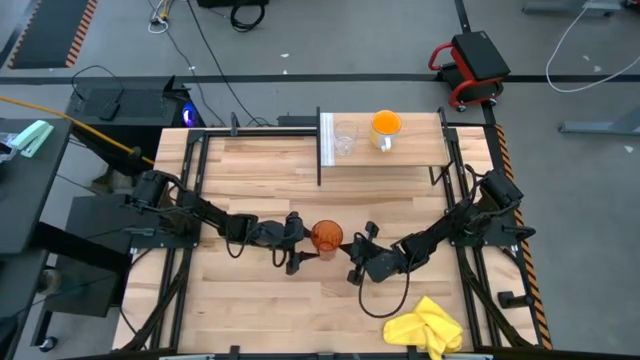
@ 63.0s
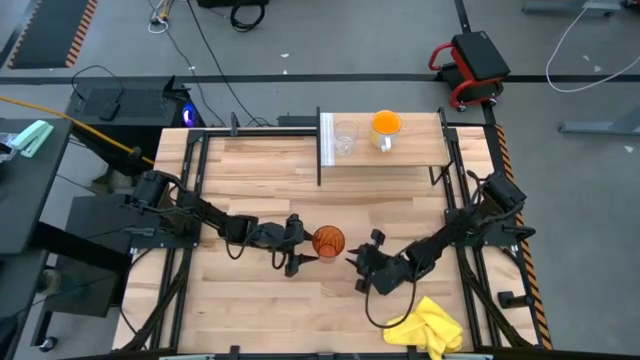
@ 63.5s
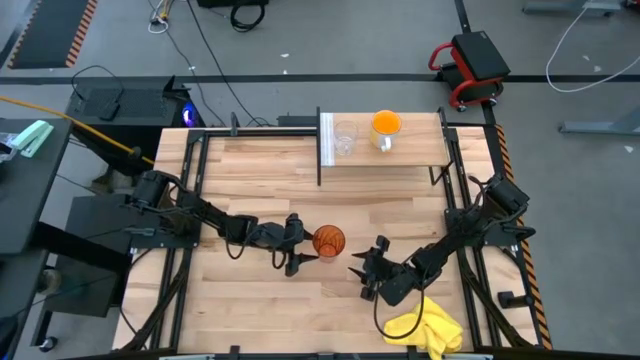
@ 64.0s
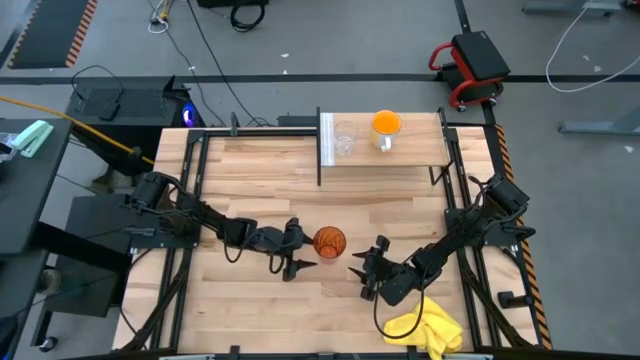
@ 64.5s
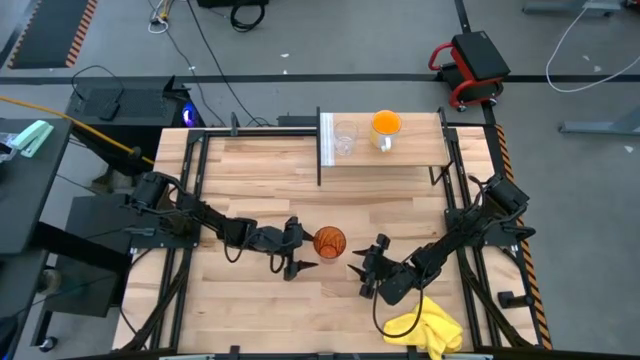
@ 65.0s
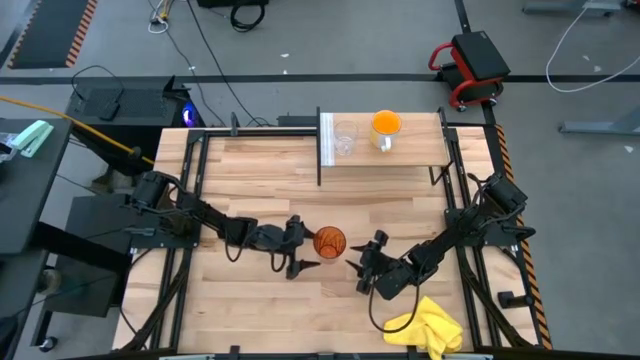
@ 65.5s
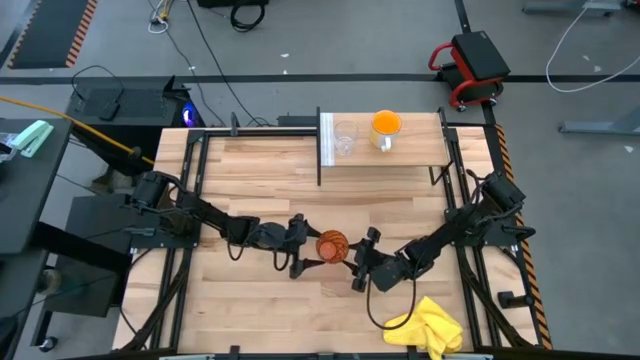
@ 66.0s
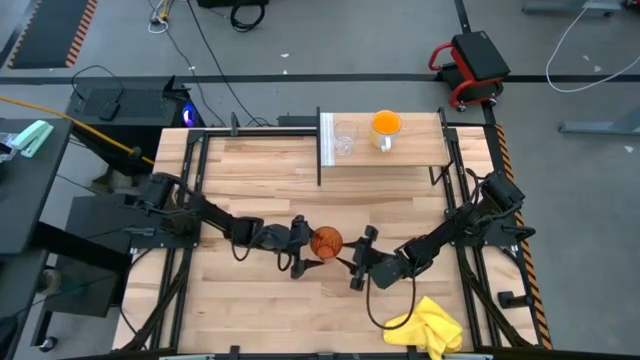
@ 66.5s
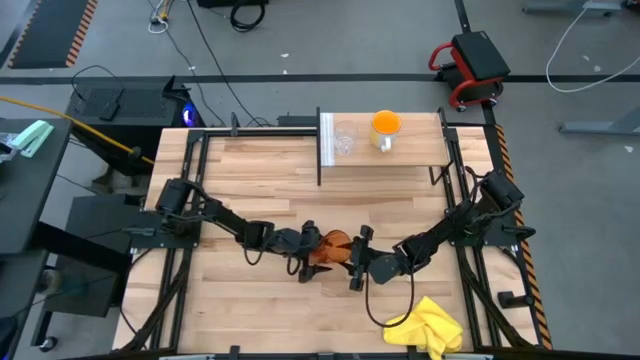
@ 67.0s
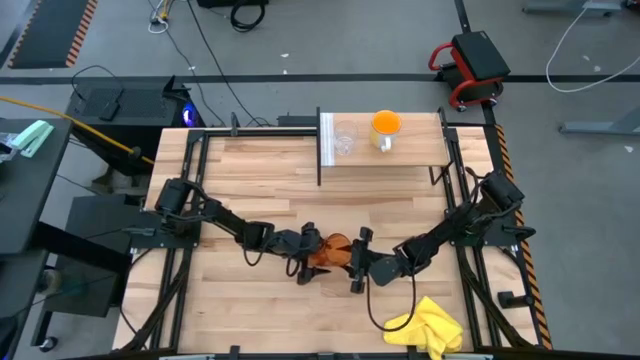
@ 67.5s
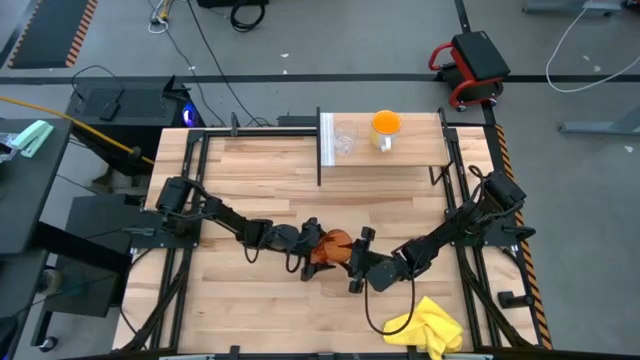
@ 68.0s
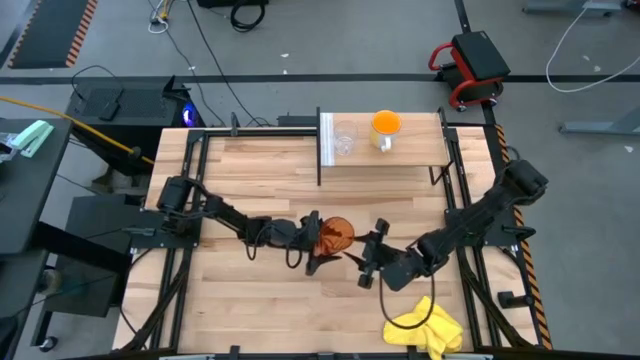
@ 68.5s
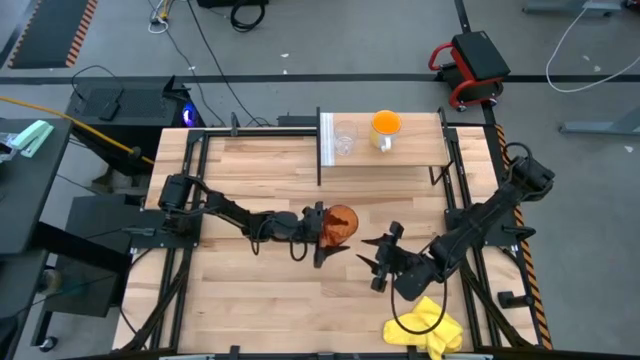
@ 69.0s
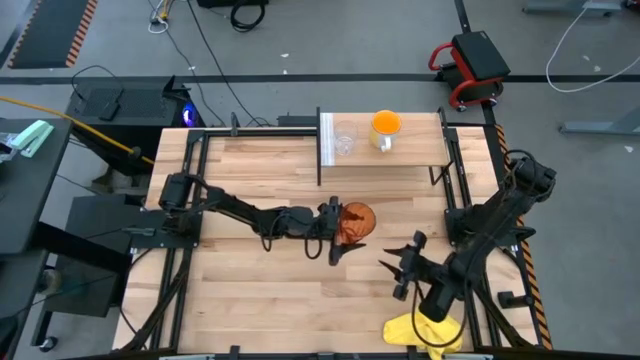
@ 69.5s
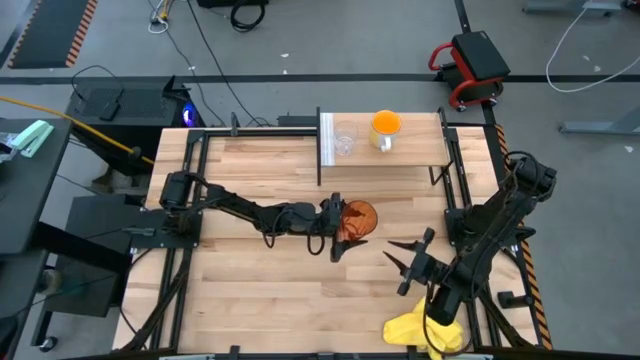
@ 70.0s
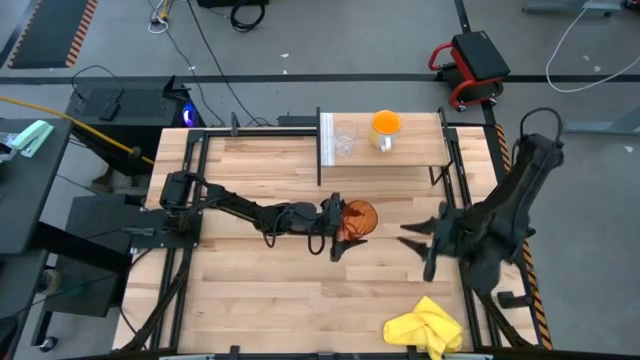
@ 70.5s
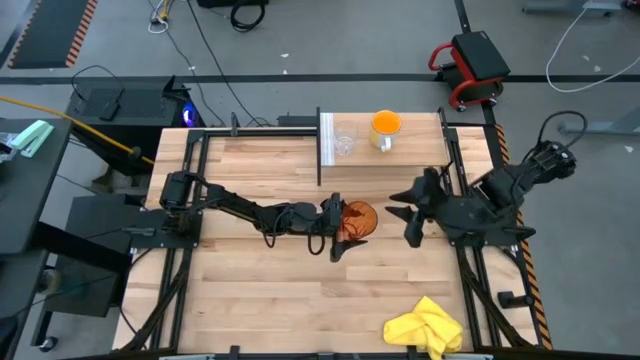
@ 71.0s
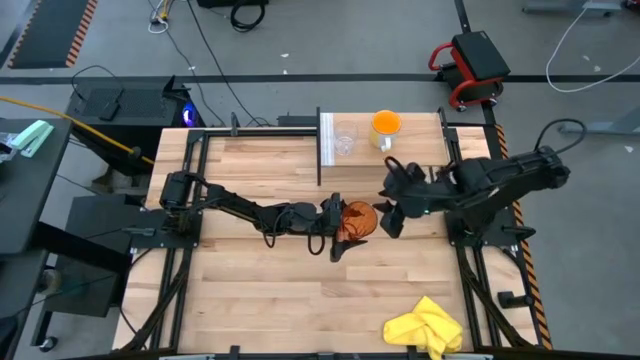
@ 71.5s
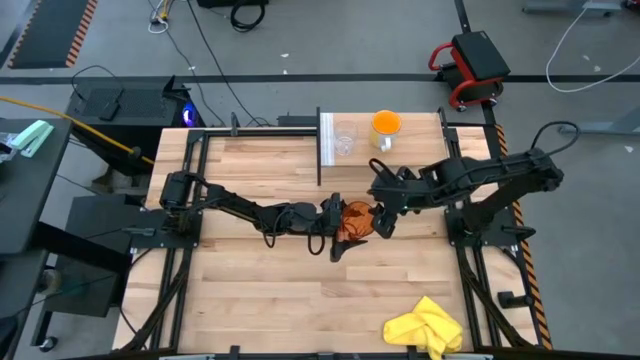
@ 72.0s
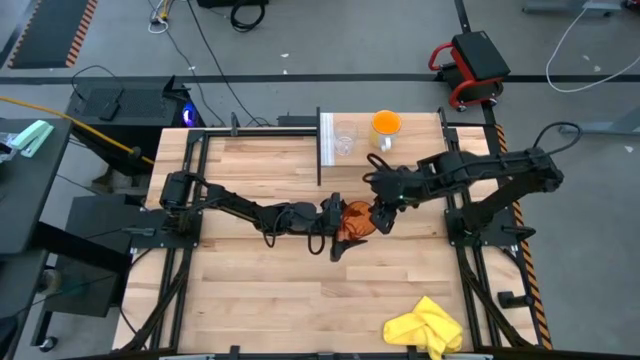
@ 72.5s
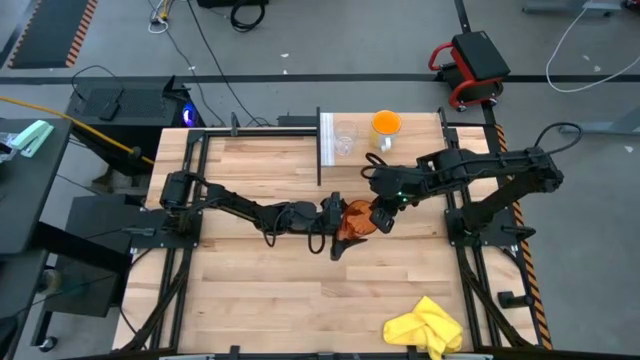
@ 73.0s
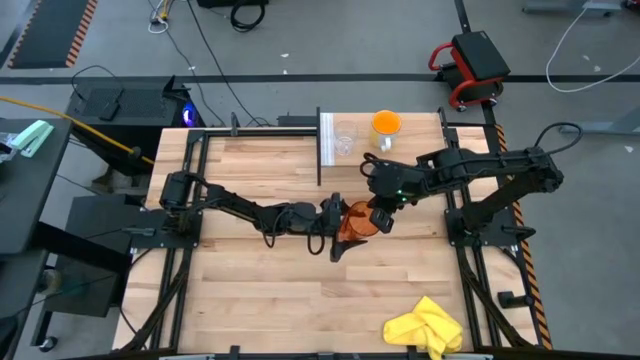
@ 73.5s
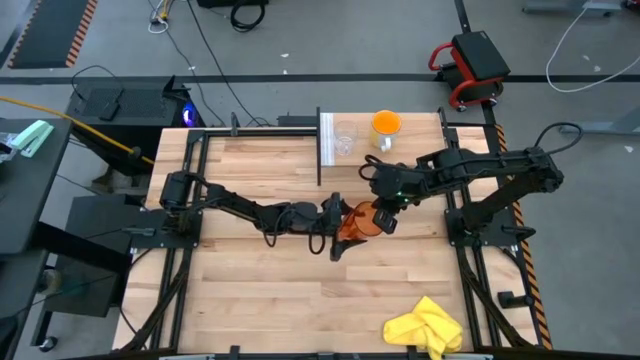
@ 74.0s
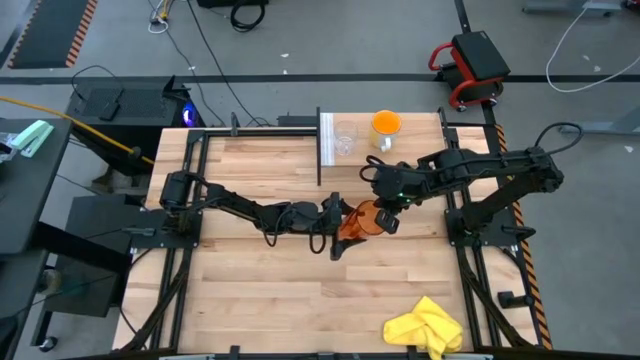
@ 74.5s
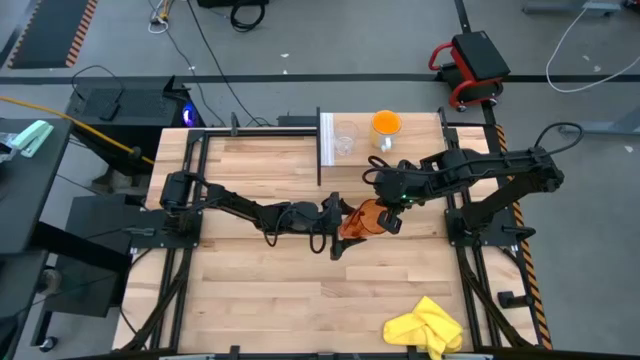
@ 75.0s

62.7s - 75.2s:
Task: Stack small to large cups/mugs on shelf
Put the brown cup on the shelf

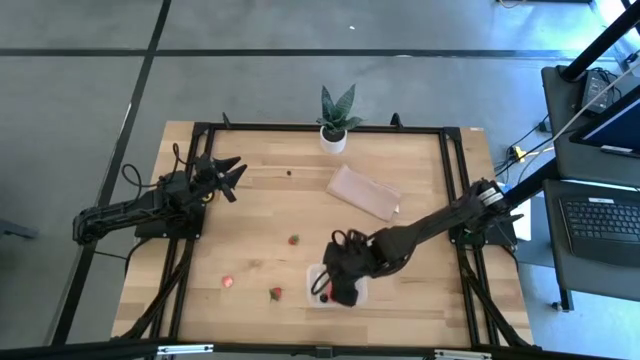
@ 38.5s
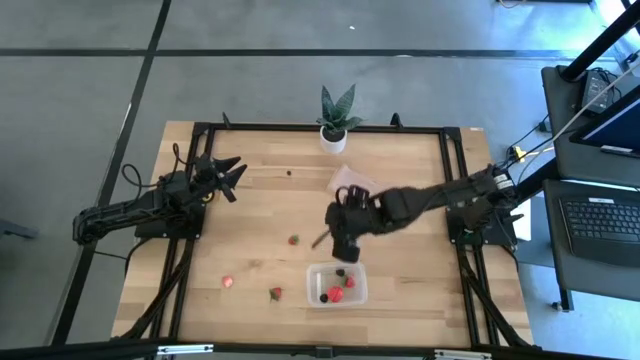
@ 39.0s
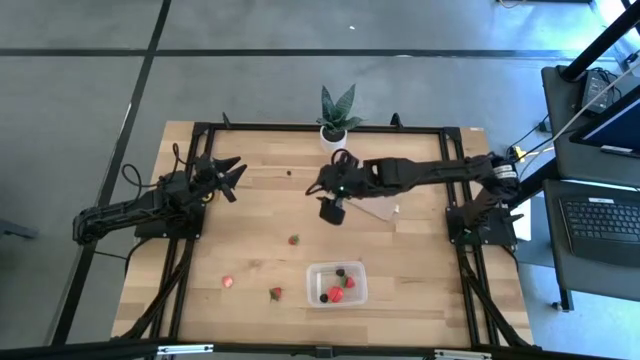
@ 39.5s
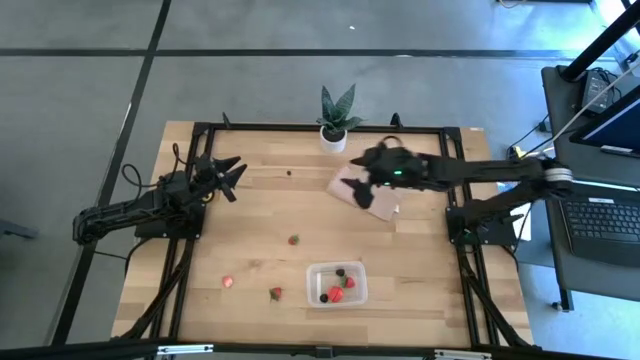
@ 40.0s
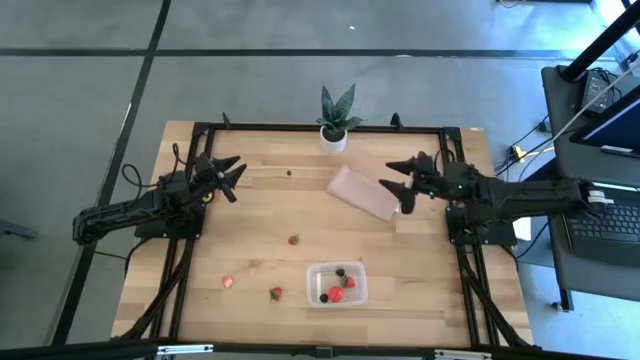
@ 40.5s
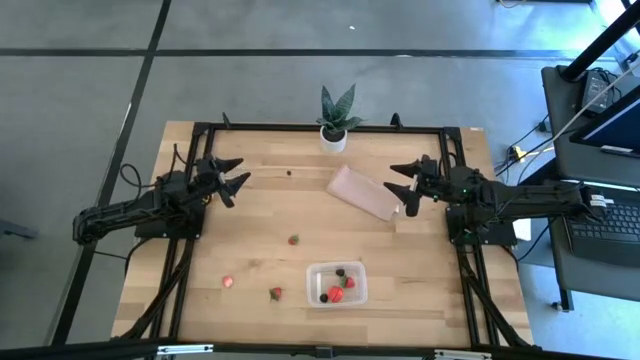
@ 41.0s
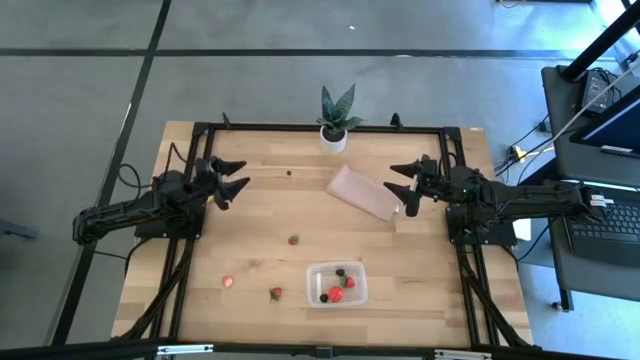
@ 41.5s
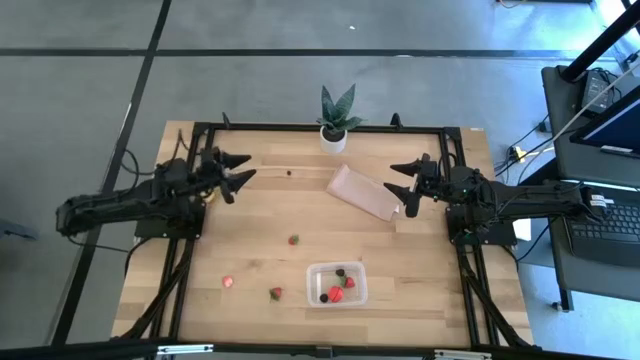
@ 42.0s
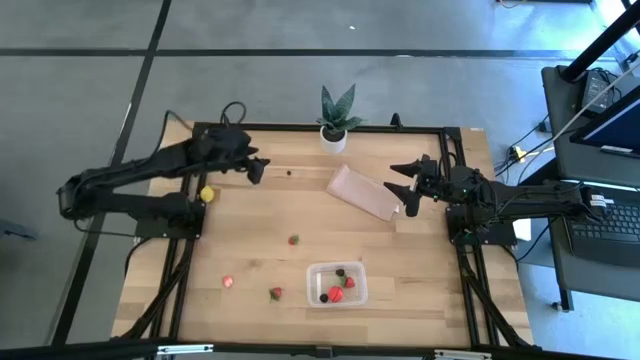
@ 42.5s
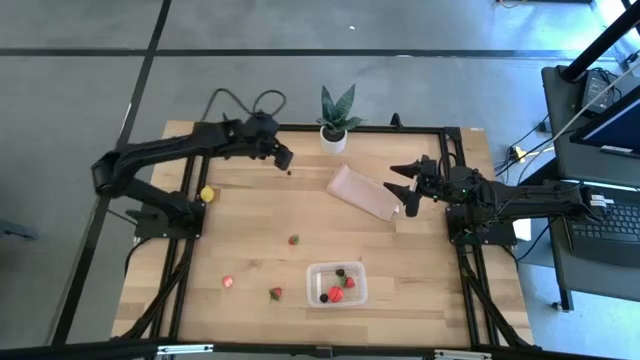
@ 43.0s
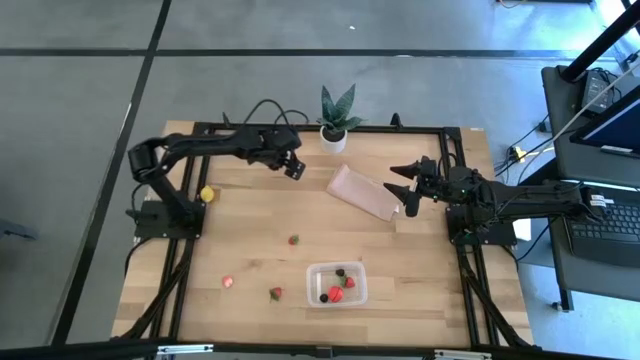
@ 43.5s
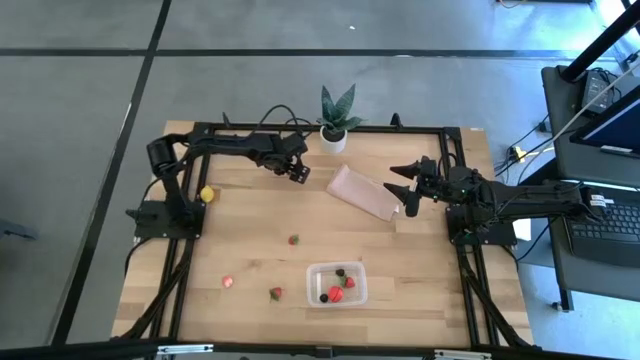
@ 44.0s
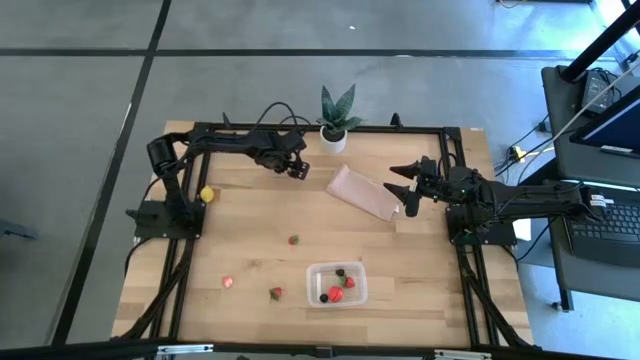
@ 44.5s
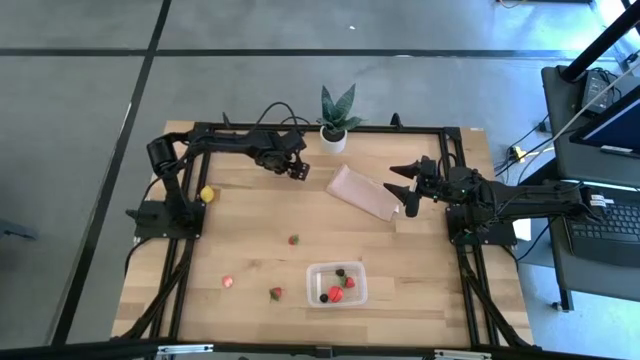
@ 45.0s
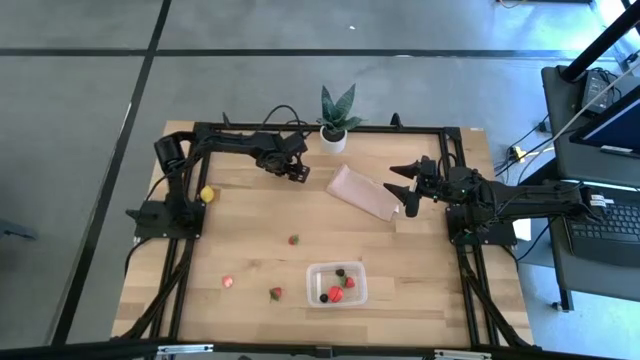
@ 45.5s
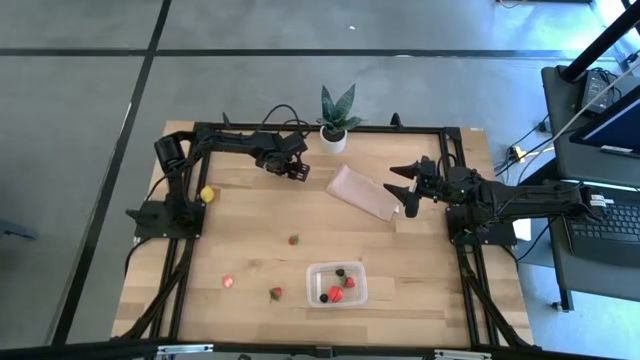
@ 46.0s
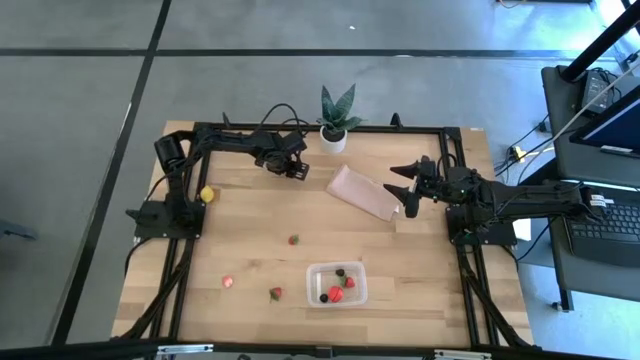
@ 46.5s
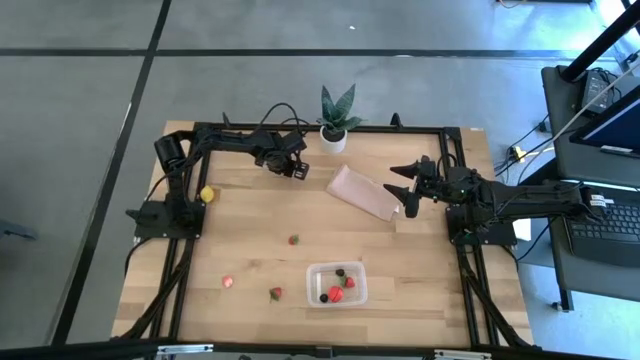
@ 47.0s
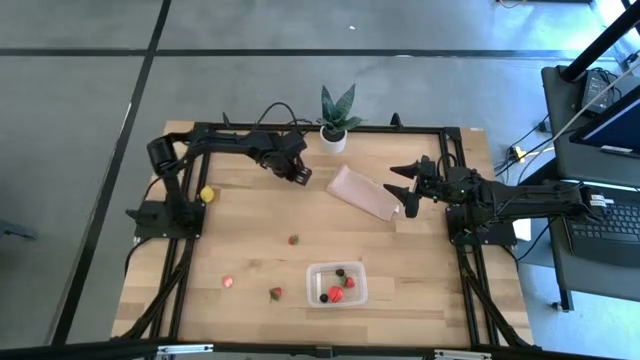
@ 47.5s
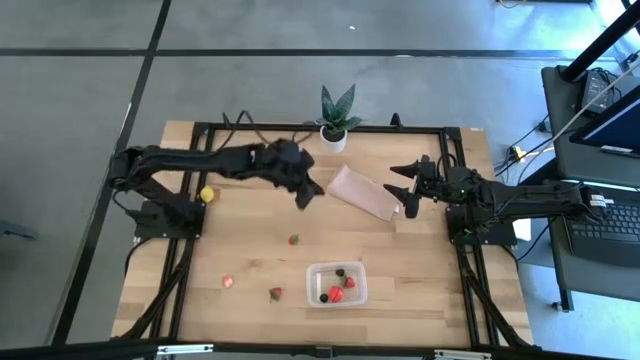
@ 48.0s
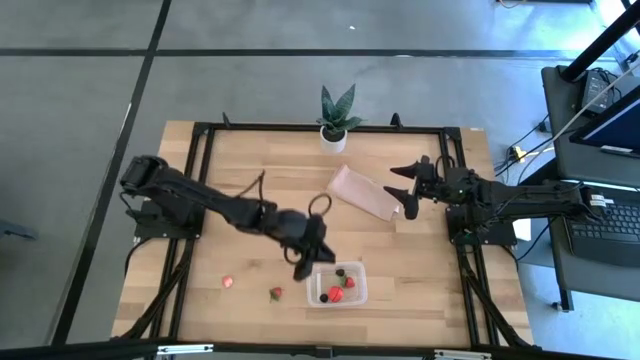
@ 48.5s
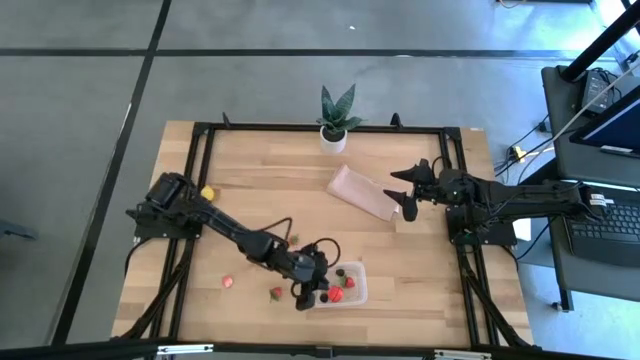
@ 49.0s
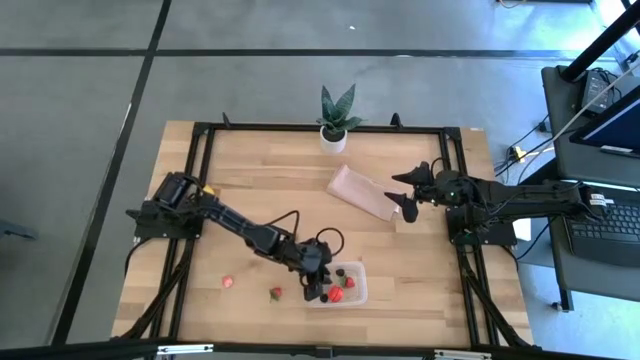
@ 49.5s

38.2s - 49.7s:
Task: Pick and placing Produce into tupperware
Put the blueberry in the bin
